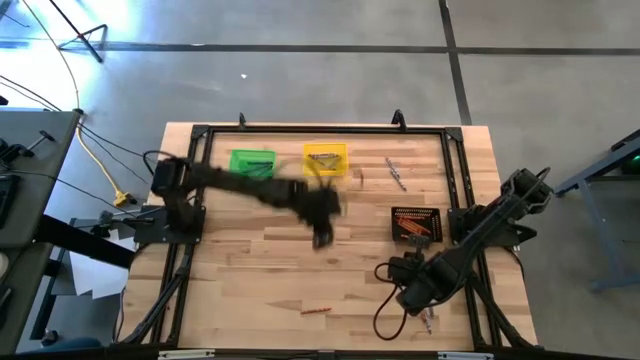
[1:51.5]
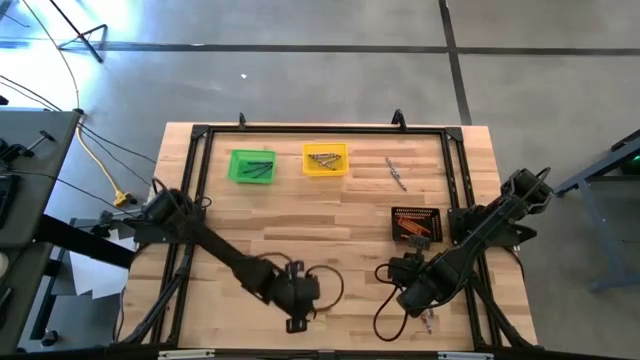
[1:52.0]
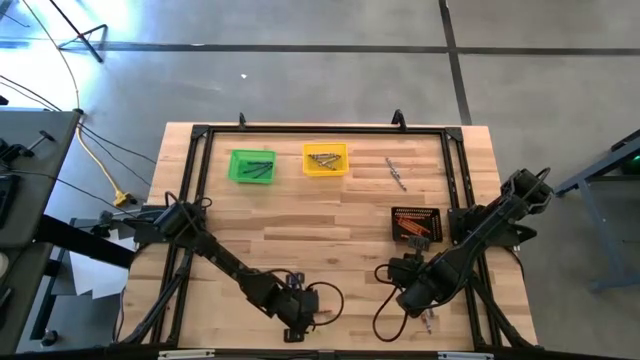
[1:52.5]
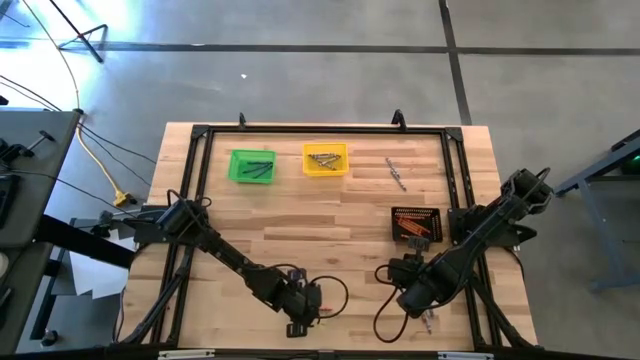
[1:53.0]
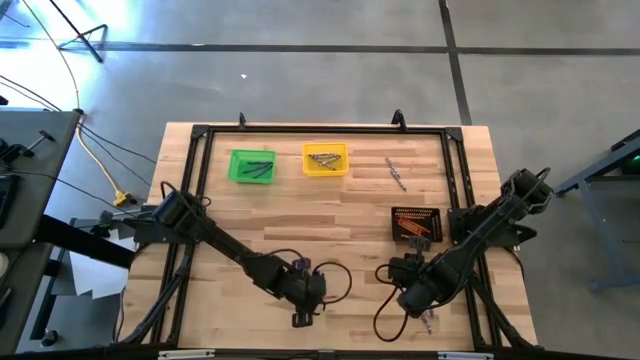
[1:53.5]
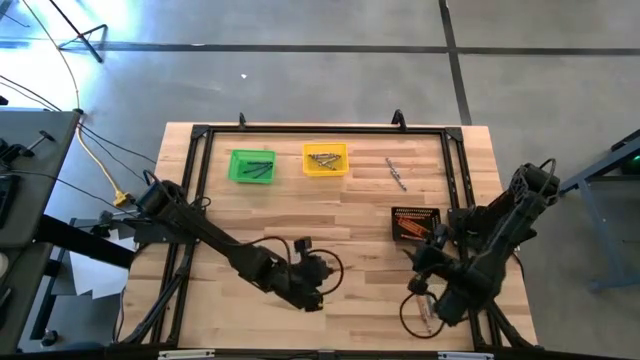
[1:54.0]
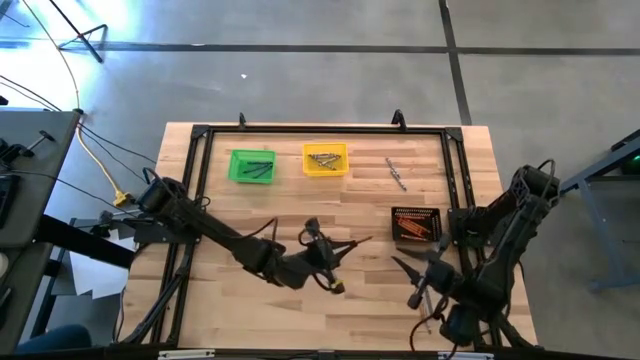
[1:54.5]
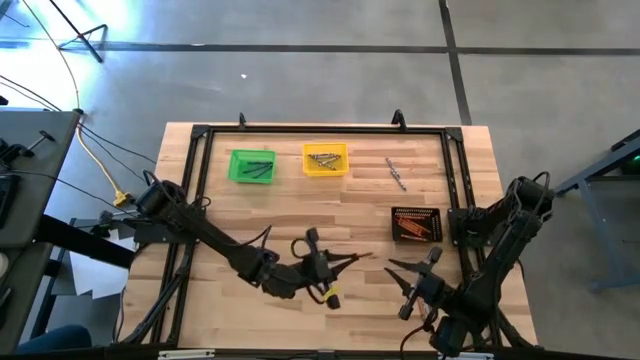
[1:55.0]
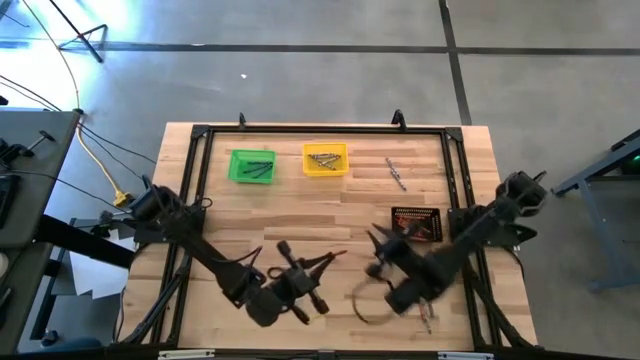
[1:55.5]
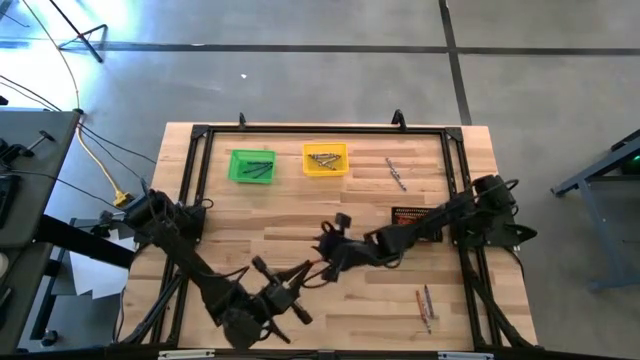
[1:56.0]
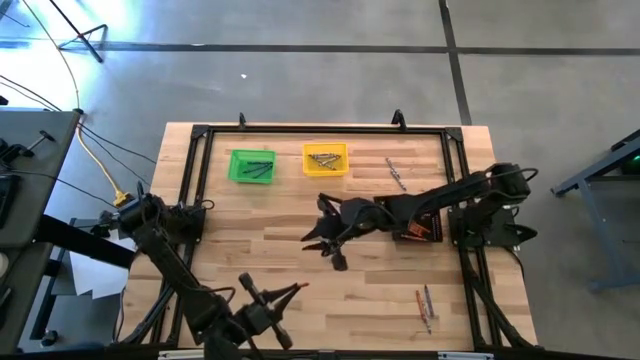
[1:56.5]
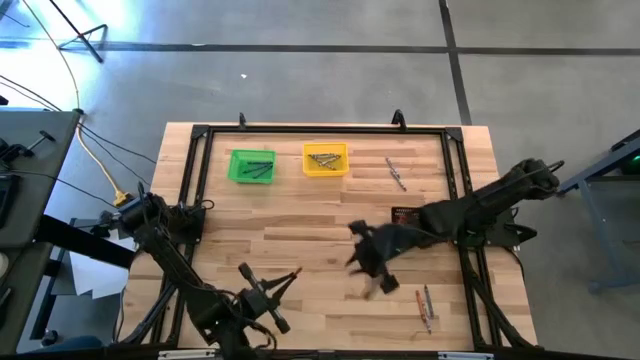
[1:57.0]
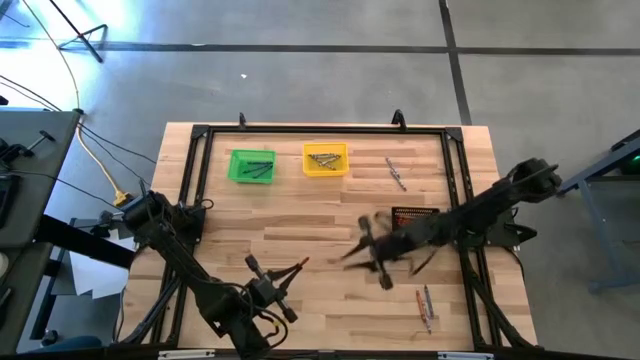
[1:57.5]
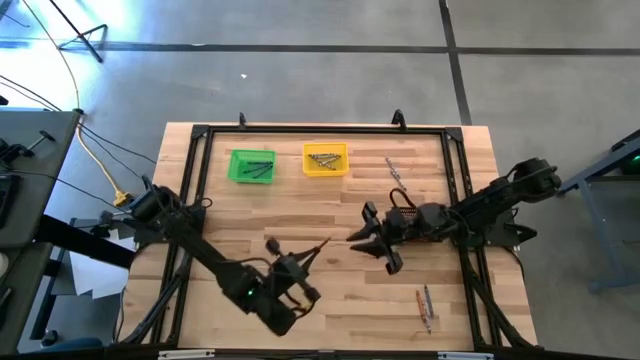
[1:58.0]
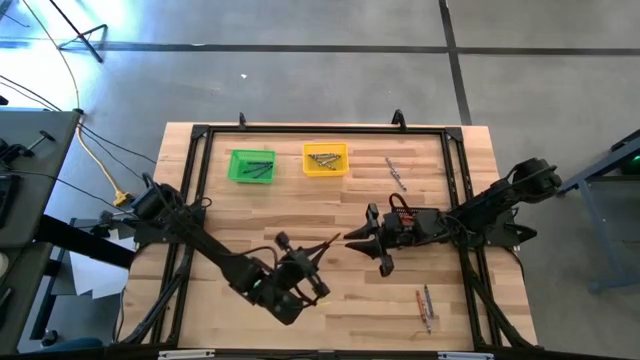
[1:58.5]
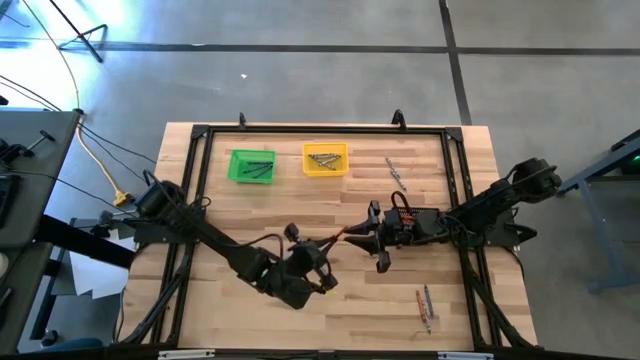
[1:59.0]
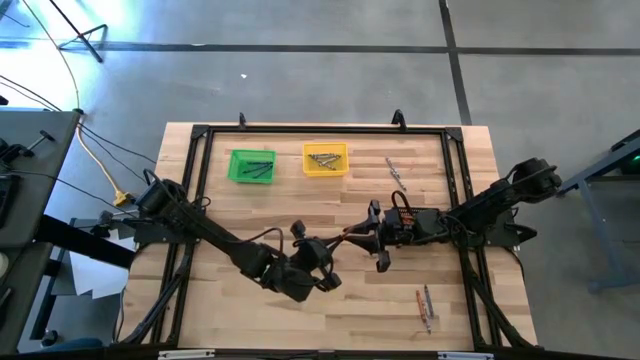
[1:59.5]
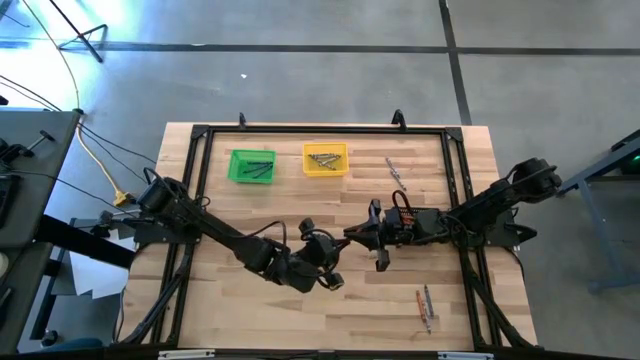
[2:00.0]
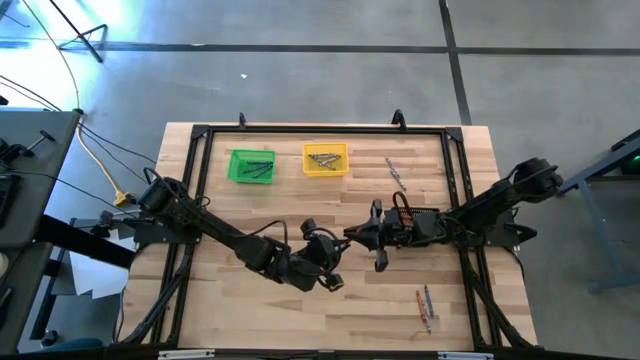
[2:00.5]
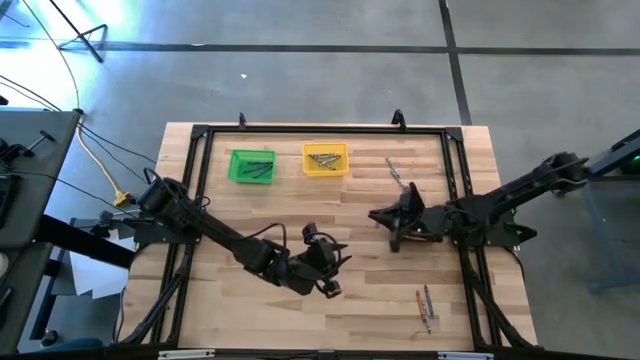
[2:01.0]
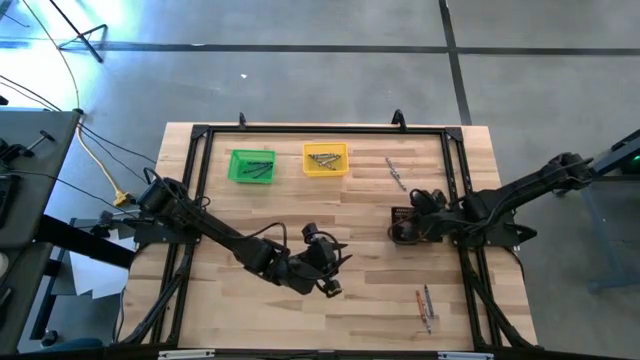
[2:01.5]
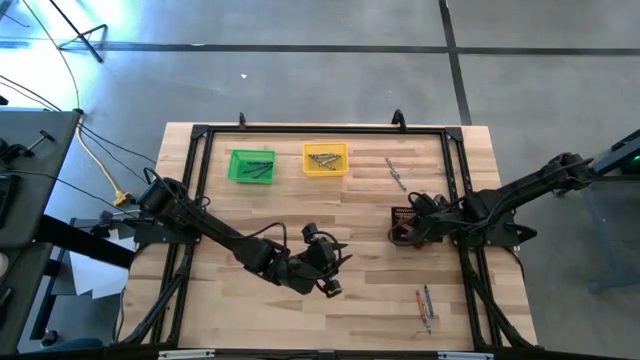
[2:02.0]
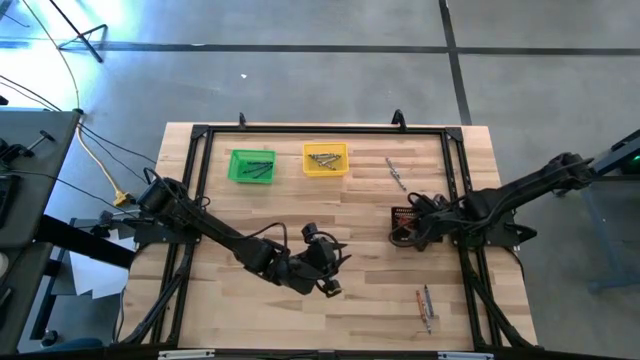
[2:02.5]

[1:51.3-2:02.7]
Task: Sort crayons
Put the orange crayon into the black bin

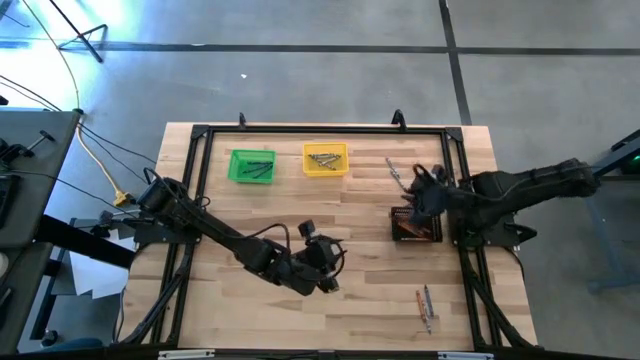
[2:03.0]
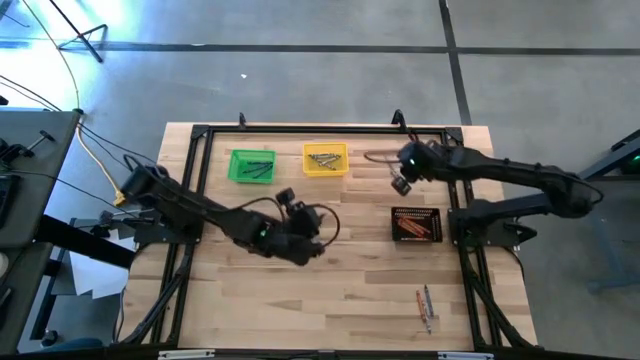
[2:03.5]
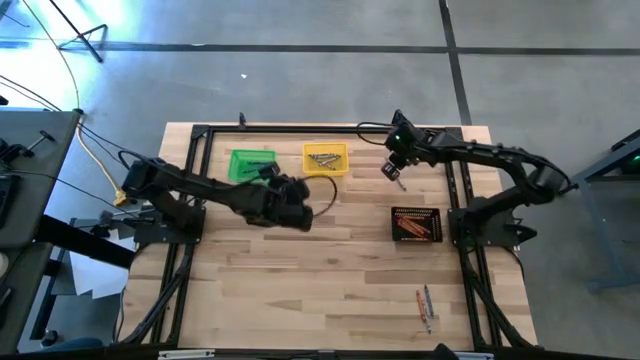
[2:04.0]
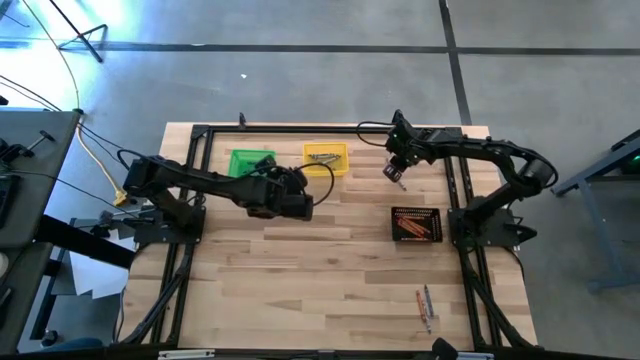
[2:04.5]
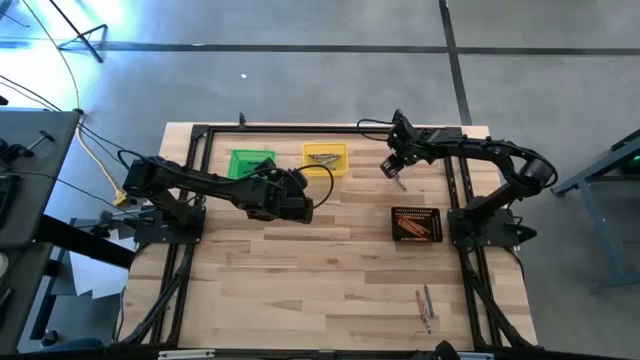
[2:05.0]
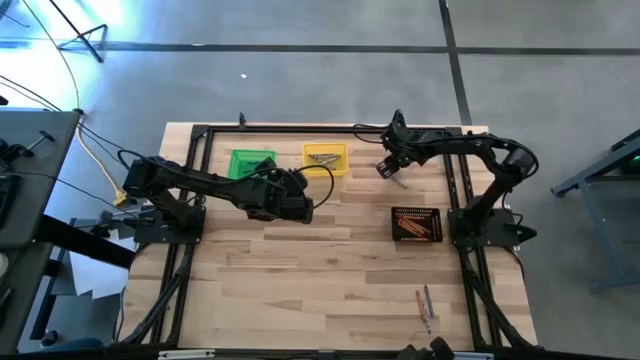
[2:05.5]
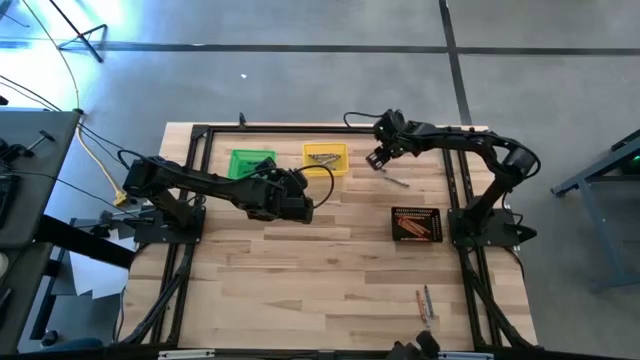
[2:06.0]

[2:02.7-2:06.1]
Put the gray crayon into the yellow bin

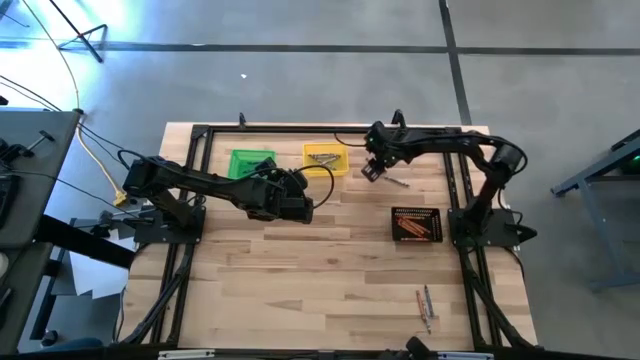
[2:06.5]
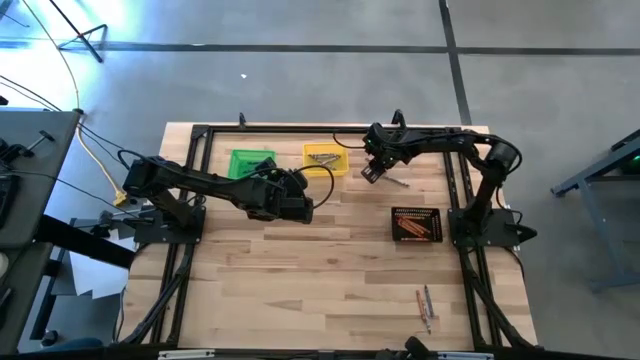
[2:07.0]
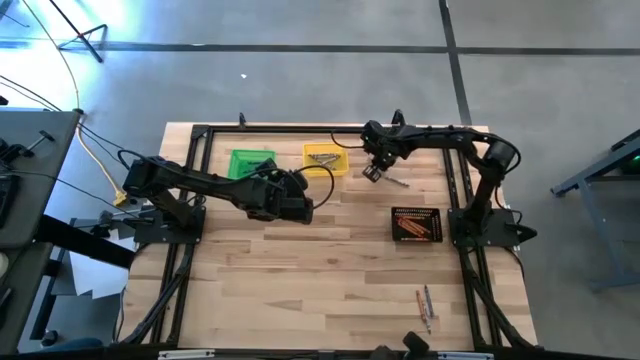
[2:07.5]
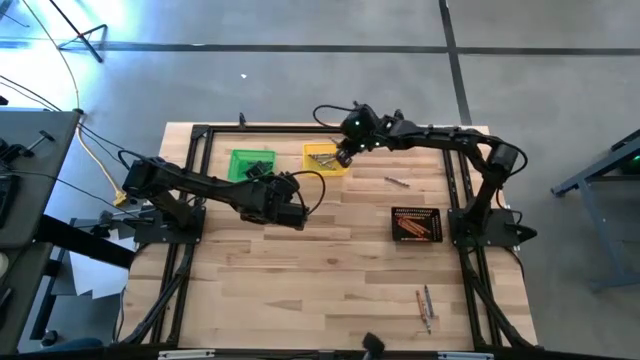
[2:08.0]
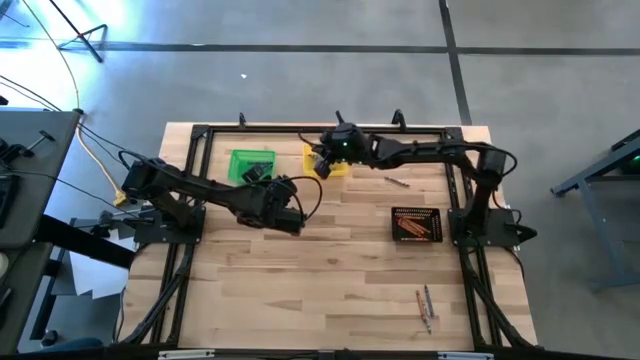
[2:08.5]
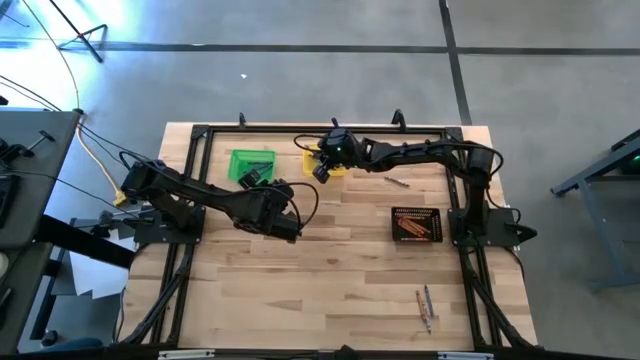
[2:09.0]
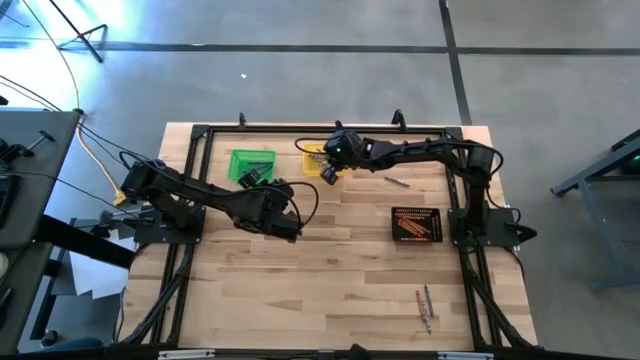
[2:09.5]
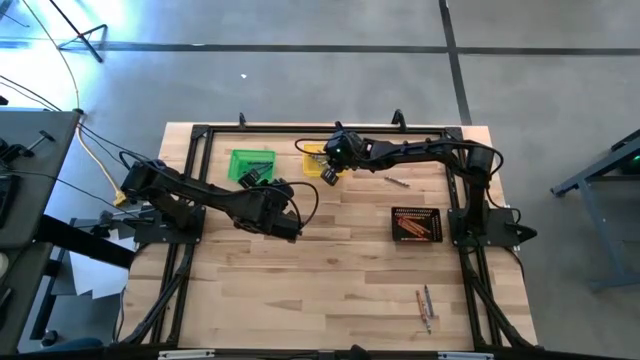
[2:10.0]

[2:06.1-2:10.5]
Put the gray crayon into the yellow bin

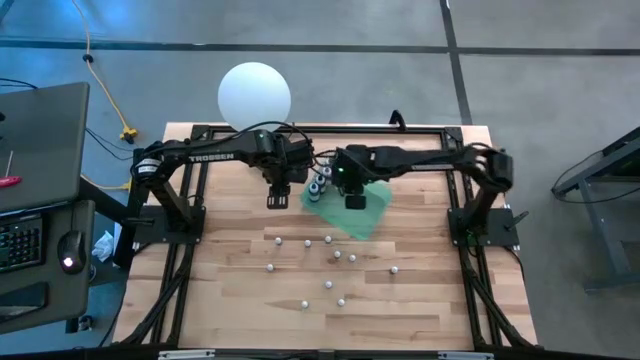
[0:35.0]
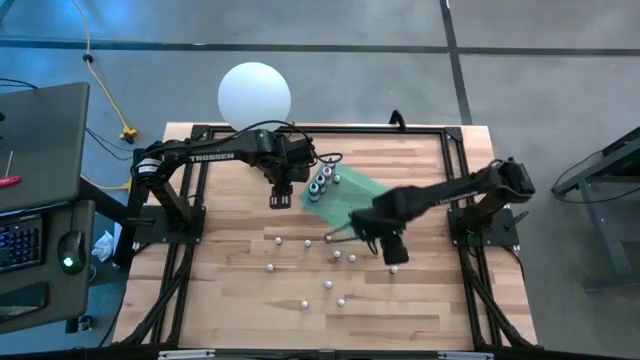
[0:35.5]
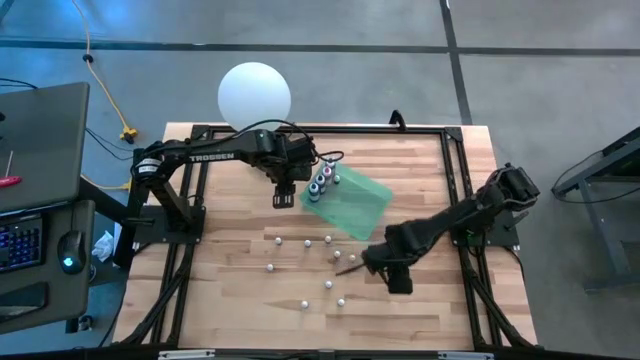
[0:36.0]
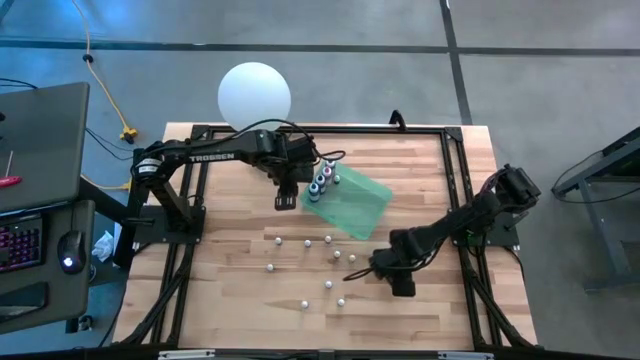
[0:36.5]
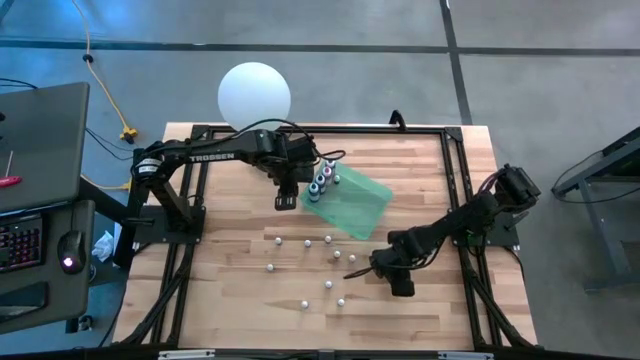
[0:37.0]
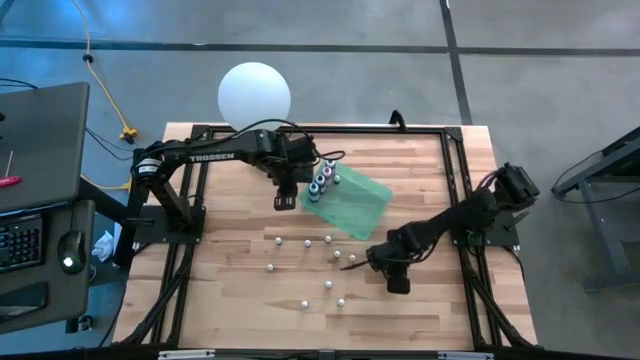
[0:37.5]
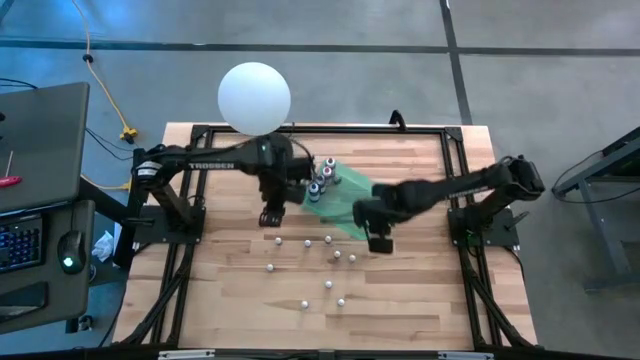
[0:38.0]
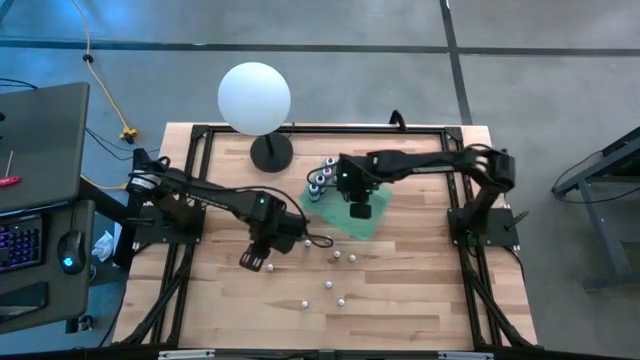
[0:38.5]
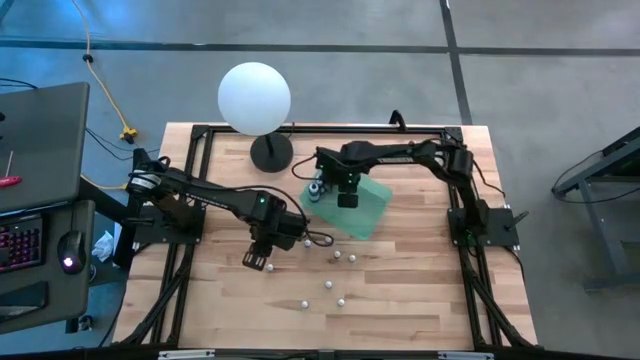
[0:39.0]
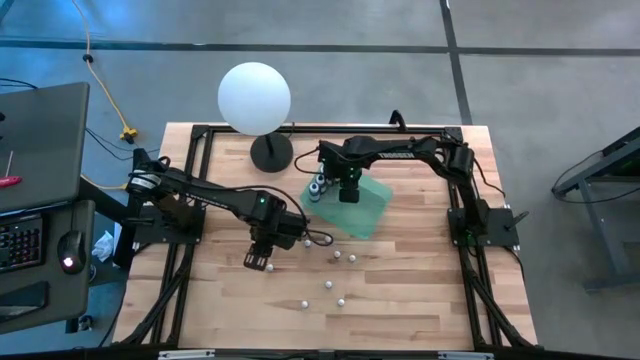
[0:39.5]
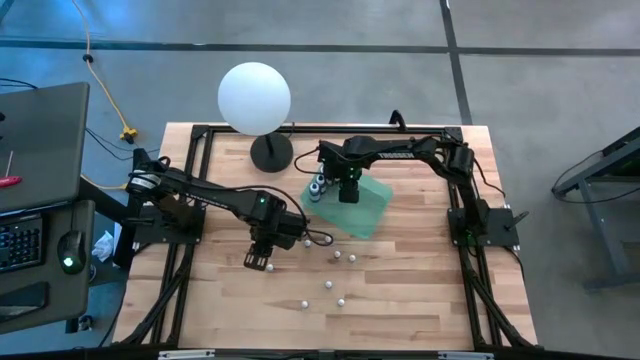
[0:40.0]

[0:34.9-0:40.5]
Task: Pick & Place food coloring
Put the top small green food coloring bottle into the green container
